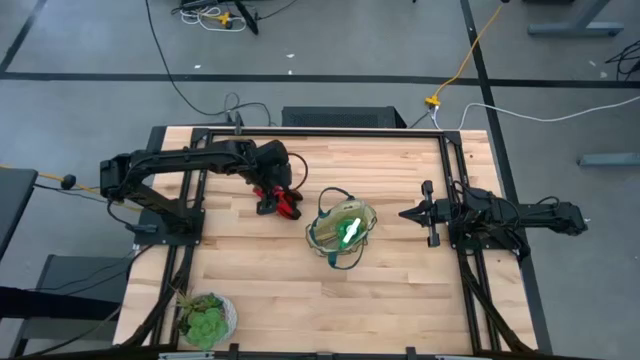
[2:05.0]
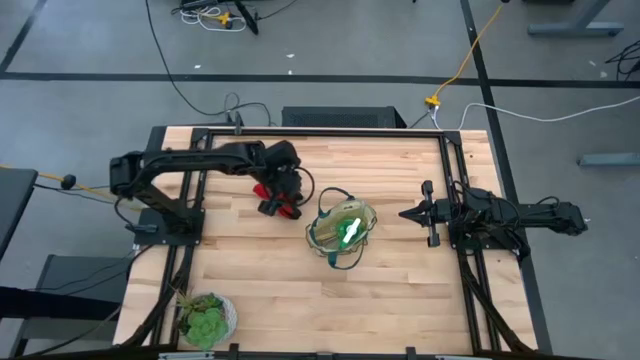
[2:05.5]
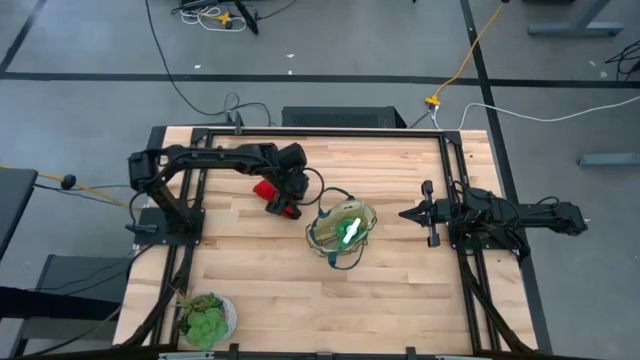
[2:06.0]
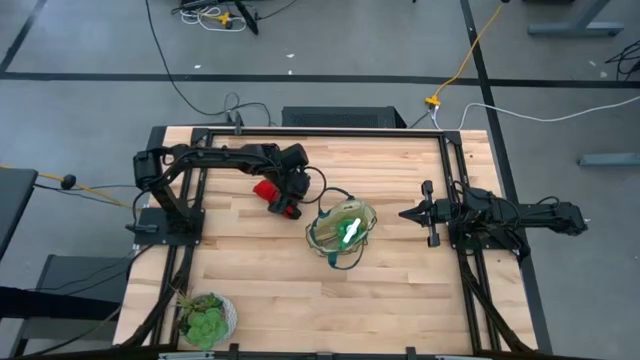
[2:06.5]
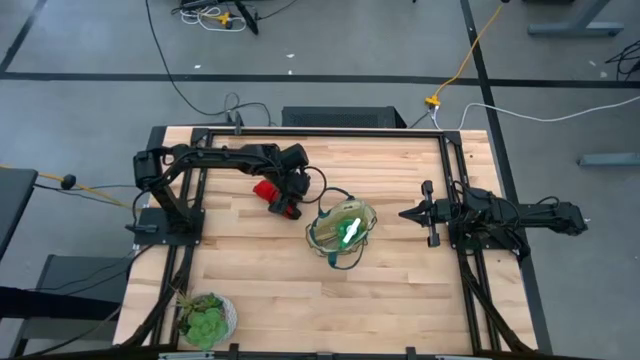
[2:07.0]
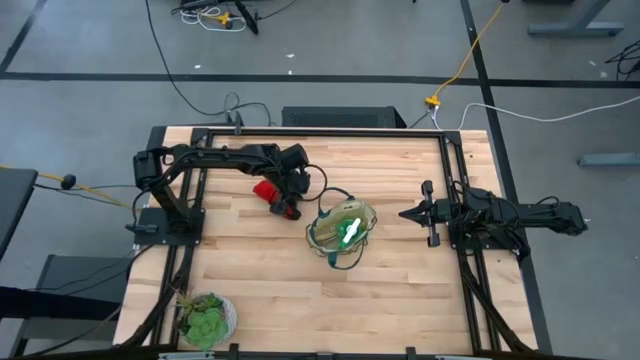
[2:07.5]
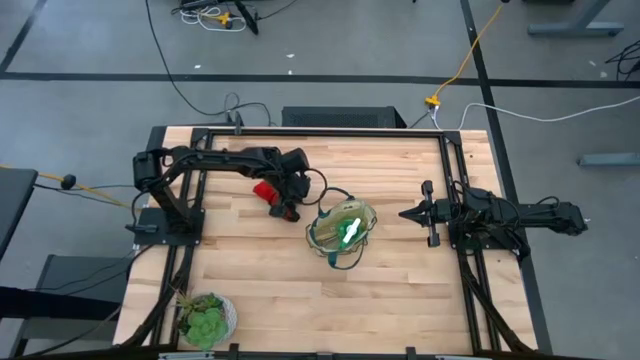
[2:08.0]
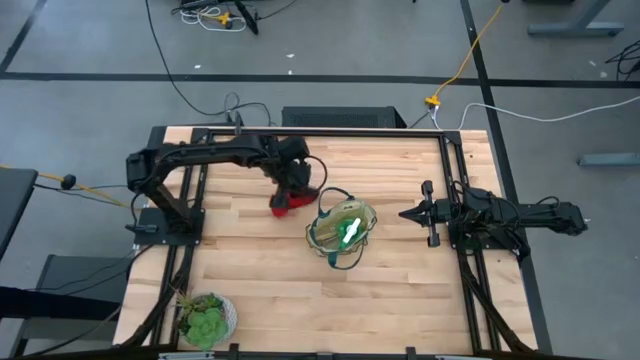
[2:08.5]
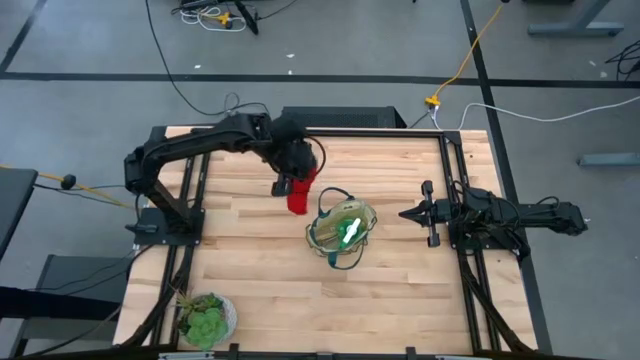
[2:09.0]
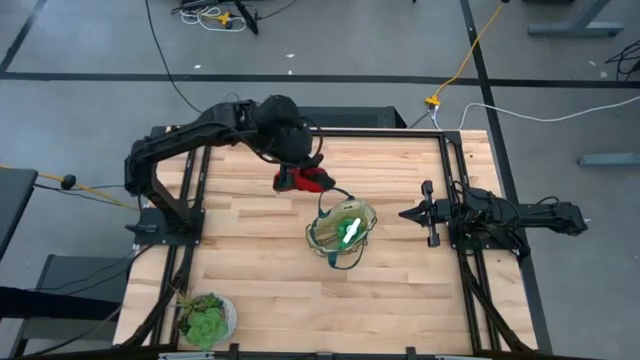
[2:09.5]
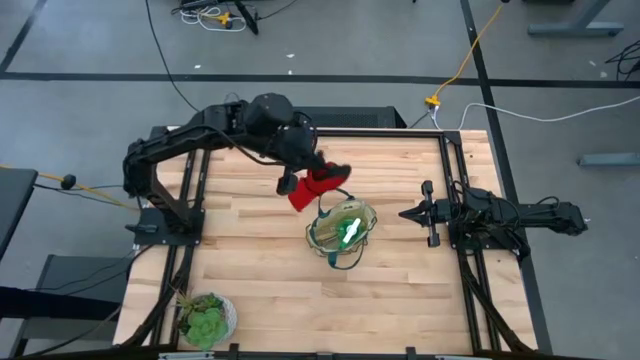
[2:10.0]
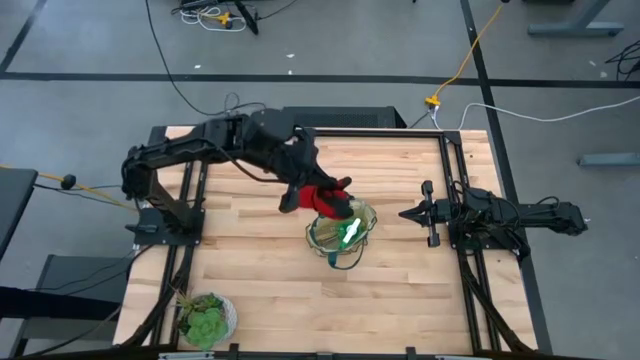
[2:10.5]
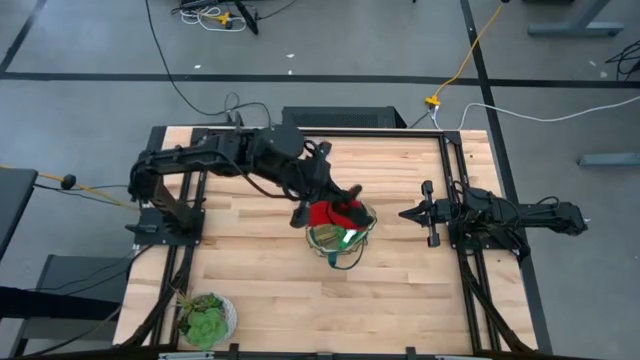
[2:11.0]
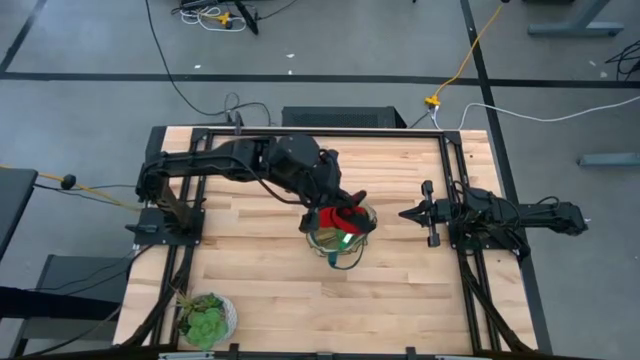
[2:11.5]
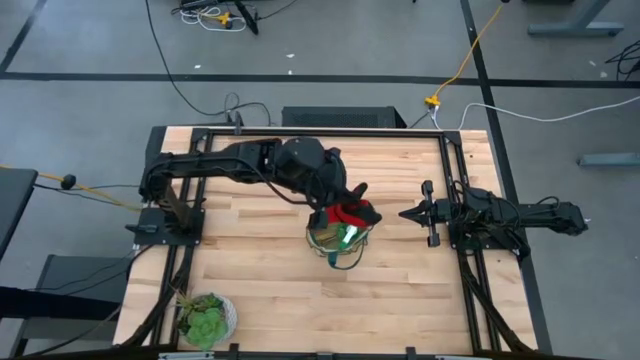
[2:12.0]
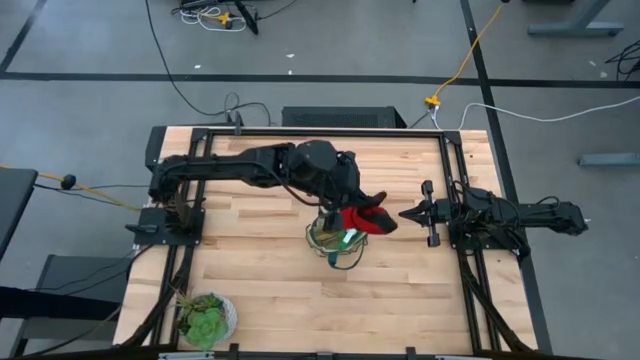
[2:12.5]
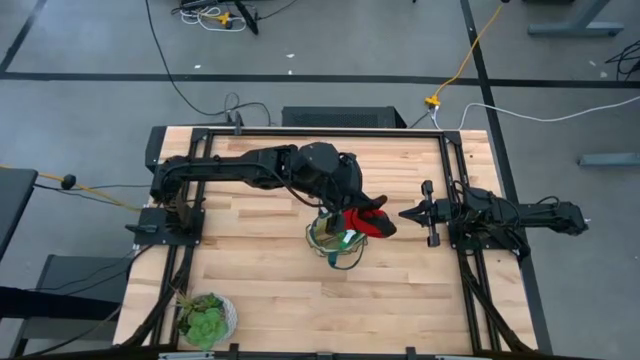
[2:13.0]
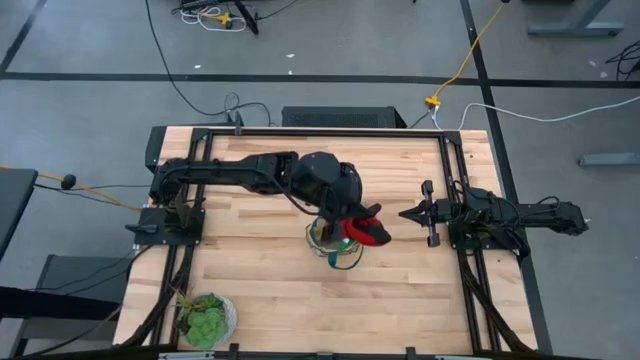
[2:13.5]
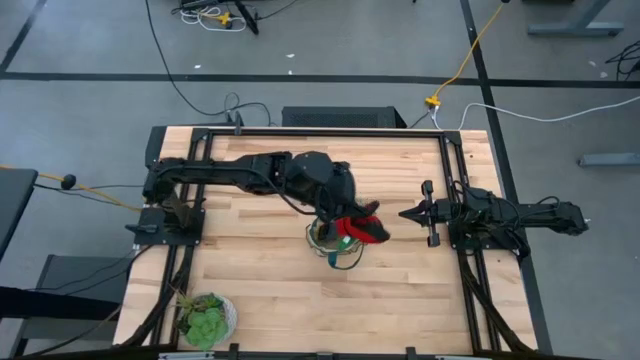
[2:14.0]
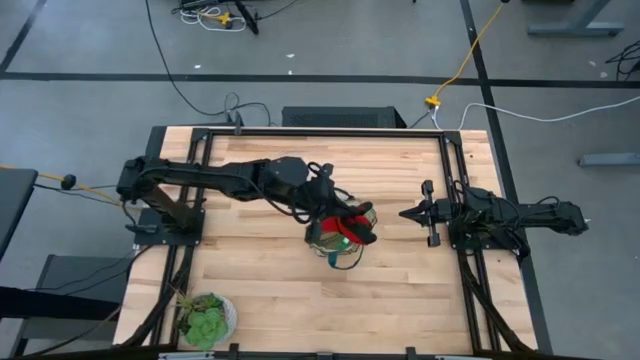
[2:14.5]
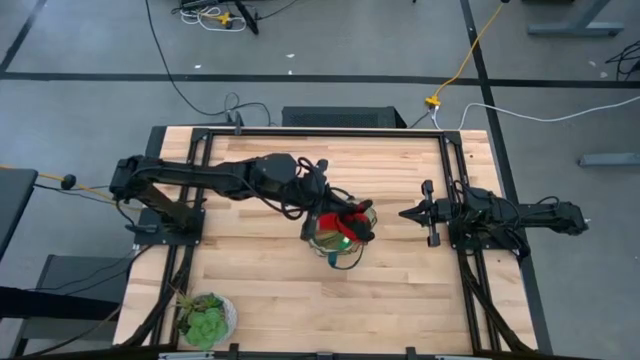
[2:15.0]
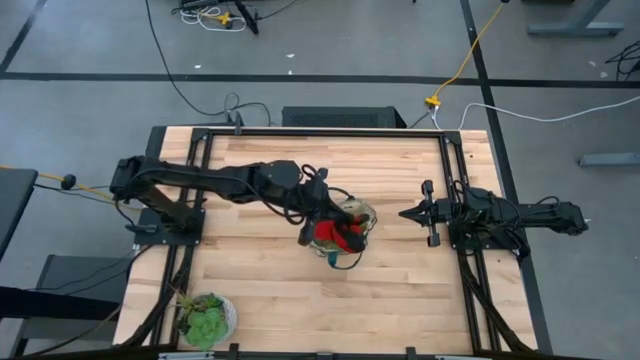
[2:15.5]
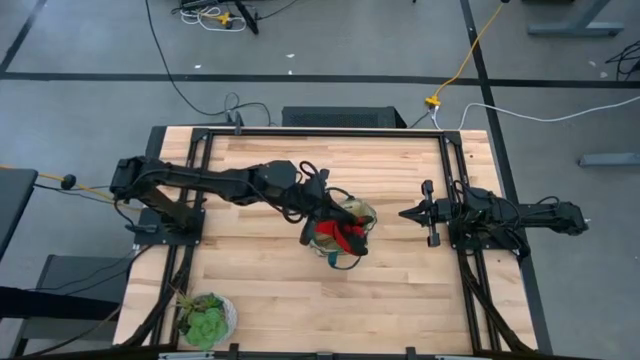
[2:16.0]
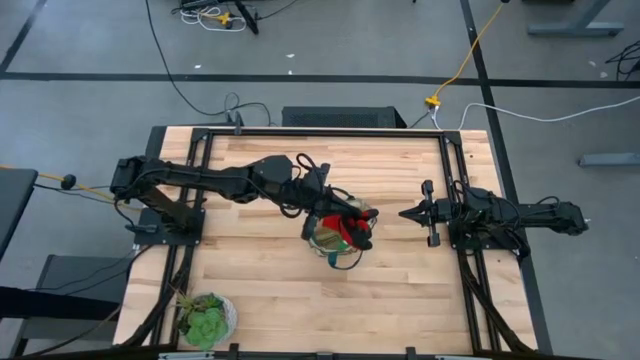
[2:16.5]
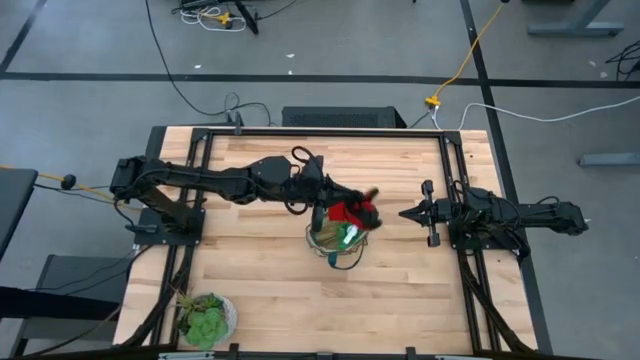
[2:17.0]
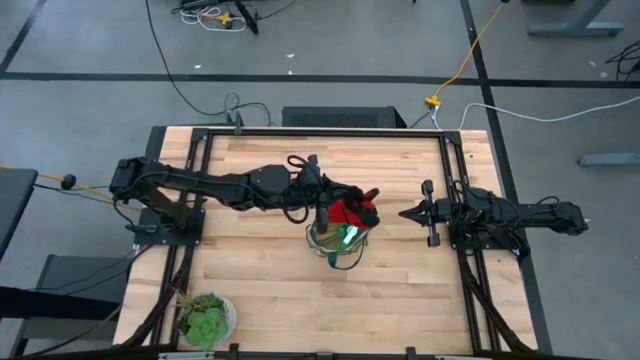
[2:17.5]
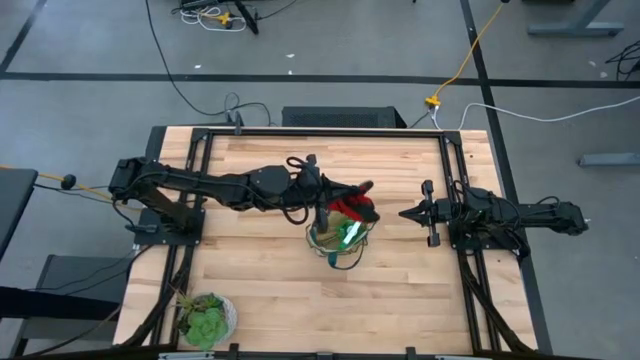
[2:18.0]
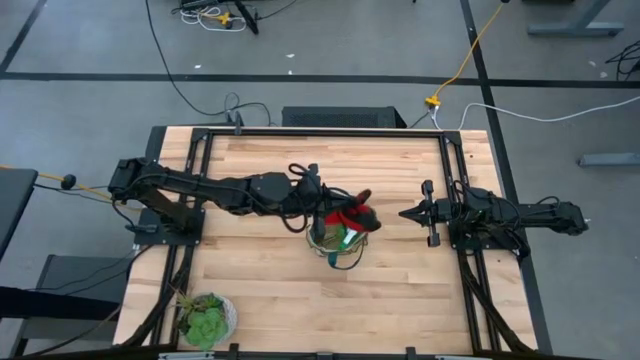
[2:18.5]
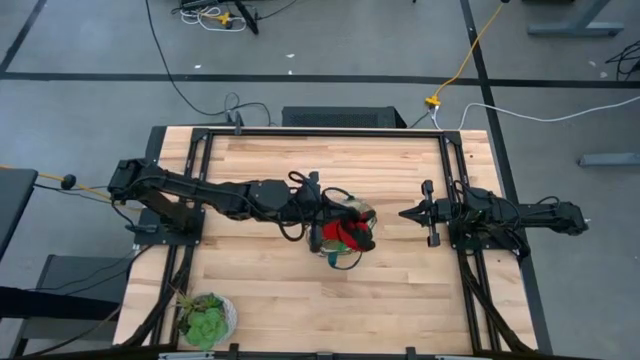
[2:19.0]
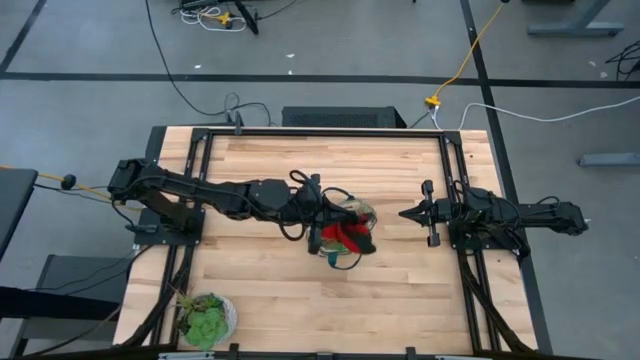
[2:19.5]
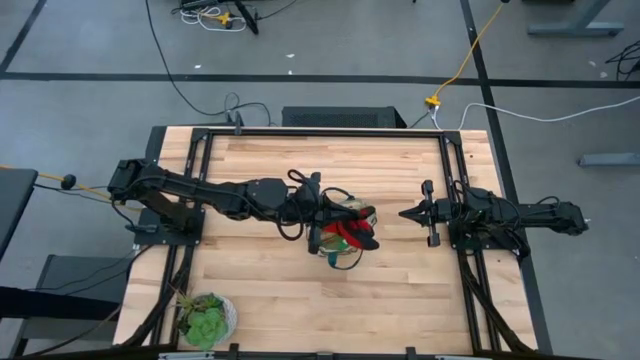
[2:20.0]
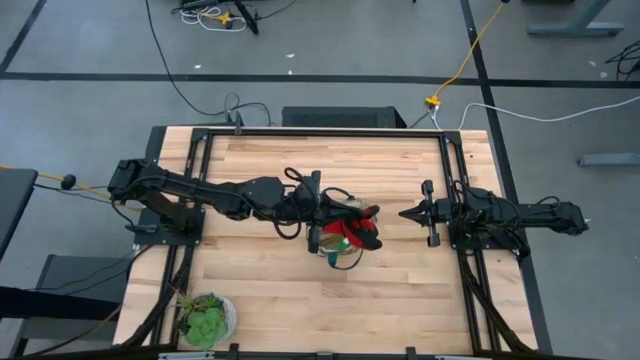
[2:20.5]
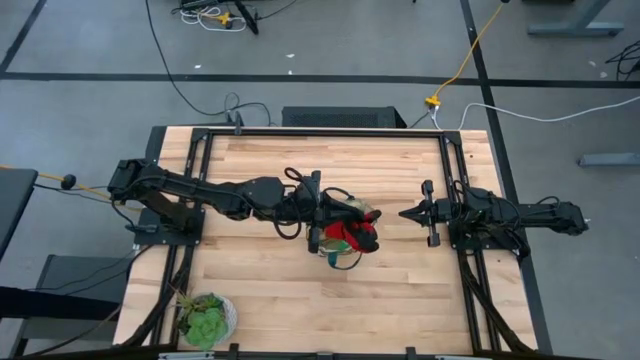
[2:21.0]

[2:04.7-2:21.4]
Task: Pick & Place Garden tools in Gardening bag
Put the red gloves into the light brown and green gardening bag

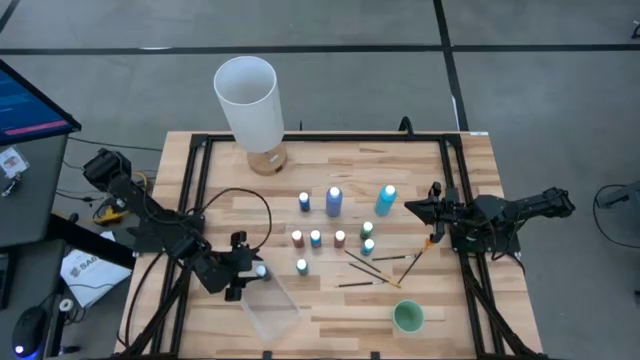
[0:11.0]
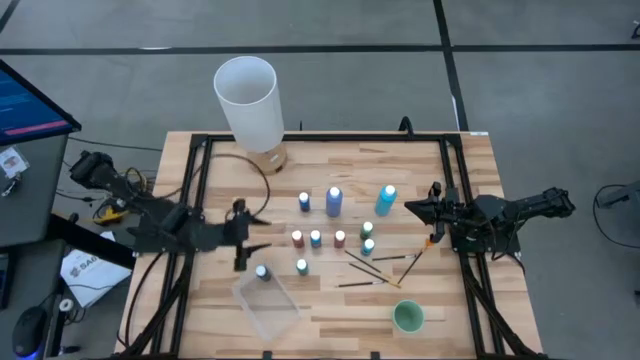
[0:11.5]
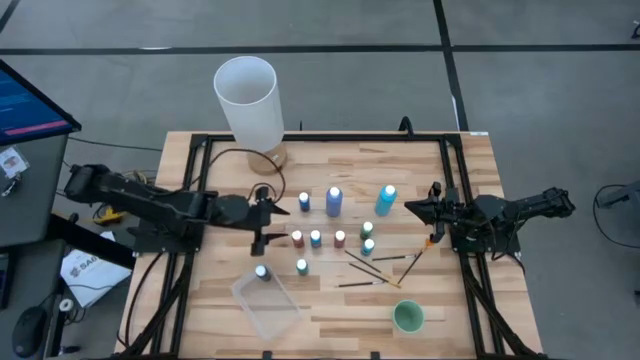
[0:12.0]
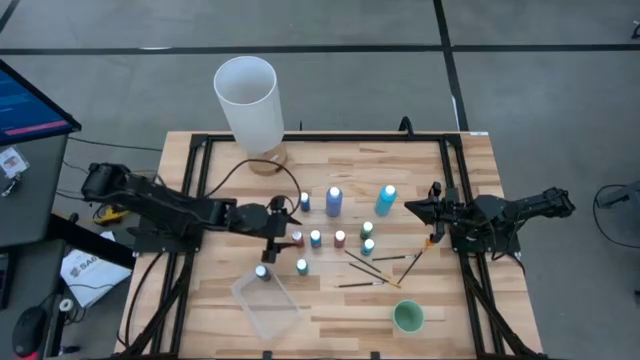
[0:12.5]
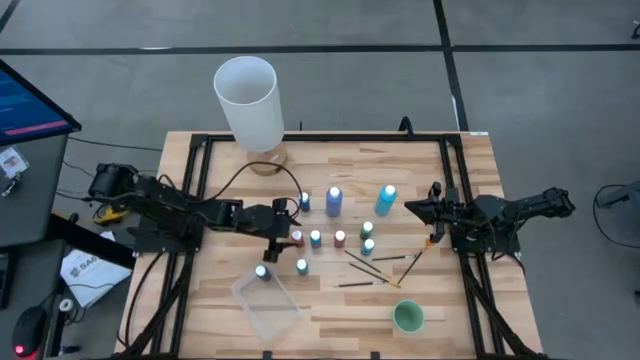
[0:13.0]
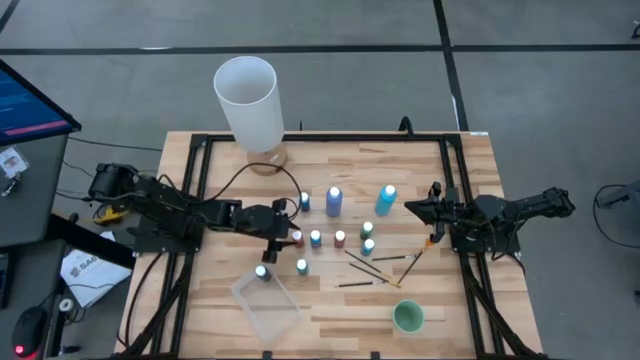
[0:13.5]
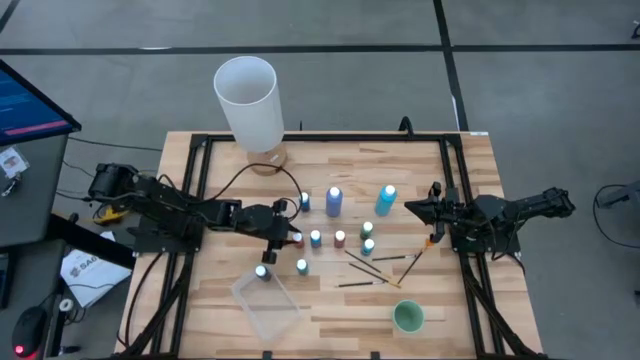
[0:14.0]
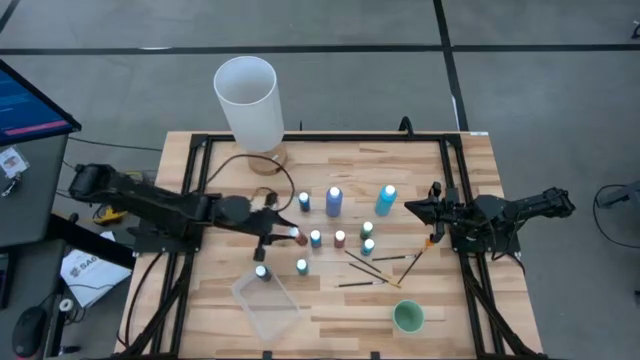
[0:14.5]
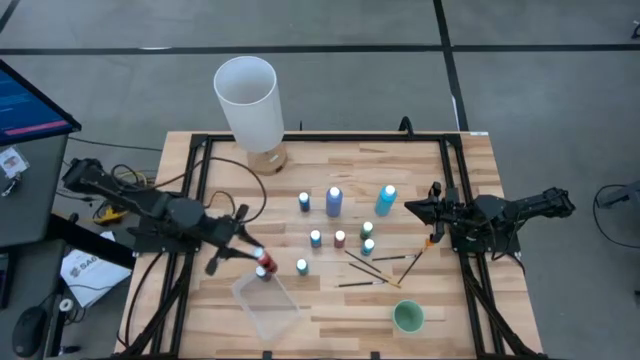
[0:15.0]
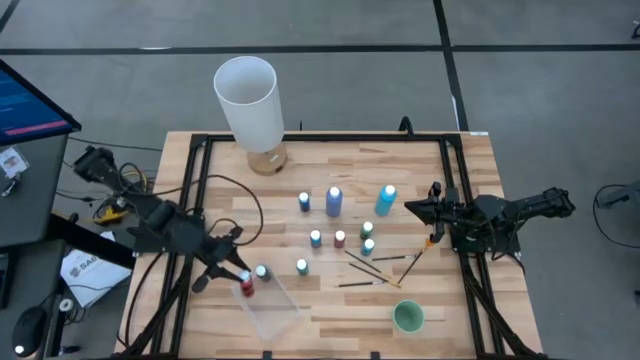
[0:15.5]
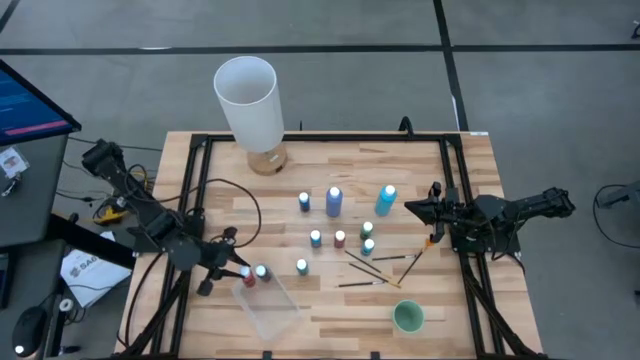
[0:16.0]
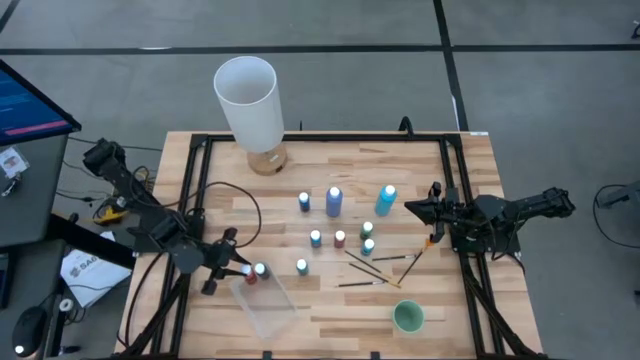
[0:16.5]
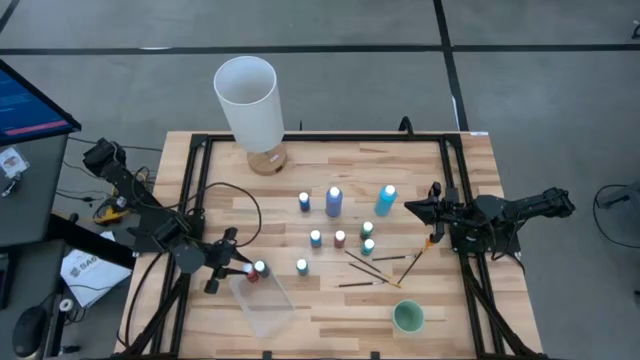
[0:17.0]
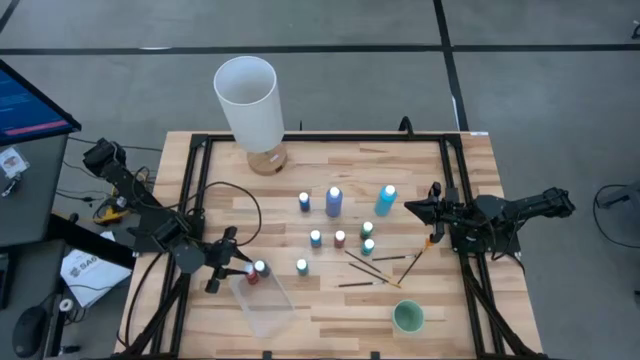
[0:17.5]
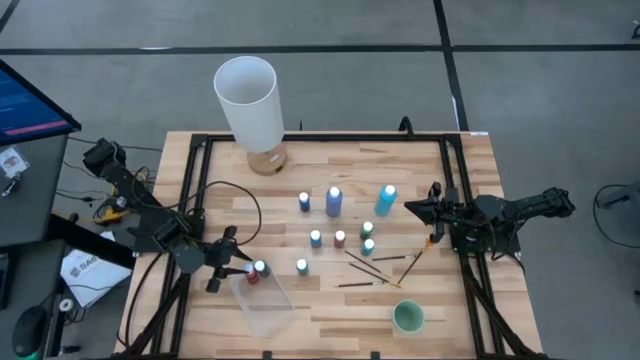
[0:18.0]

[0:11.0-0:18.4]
Task: Pick & Place Paint Supplies
Put the orange paint bottle into the transparent bin
